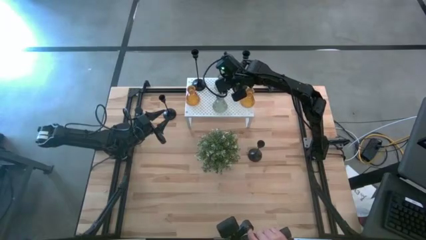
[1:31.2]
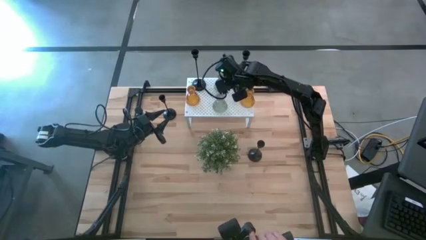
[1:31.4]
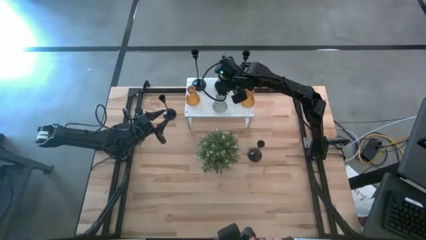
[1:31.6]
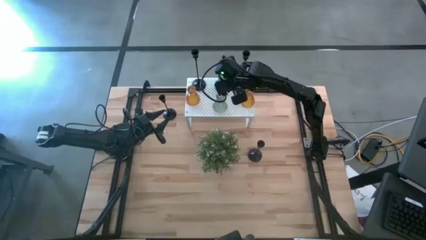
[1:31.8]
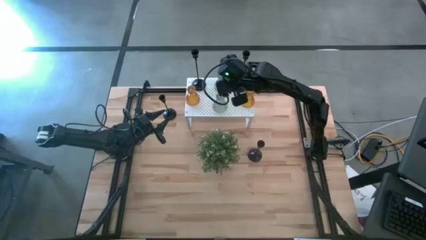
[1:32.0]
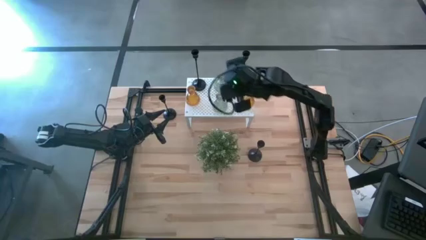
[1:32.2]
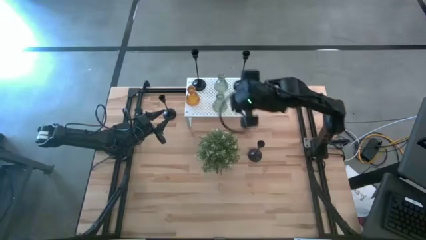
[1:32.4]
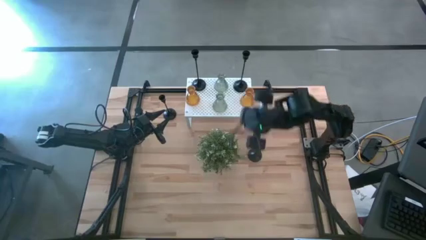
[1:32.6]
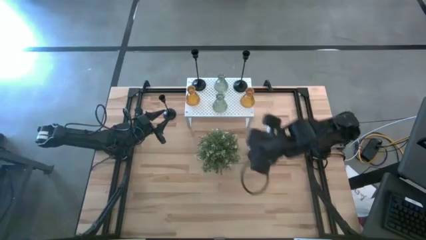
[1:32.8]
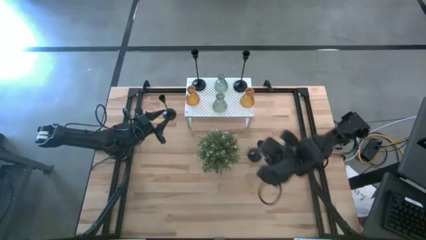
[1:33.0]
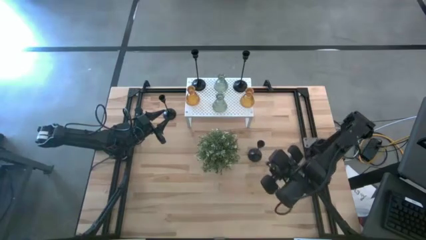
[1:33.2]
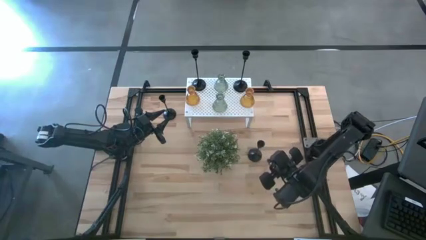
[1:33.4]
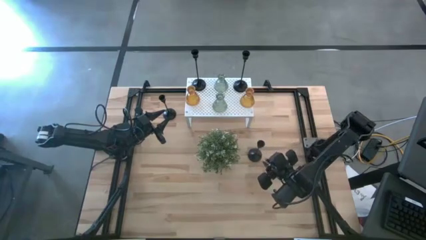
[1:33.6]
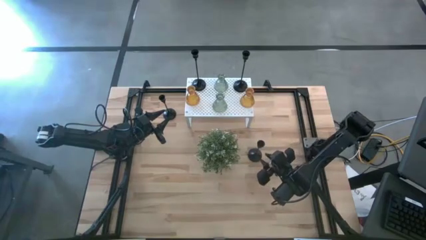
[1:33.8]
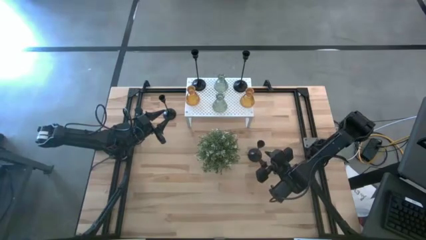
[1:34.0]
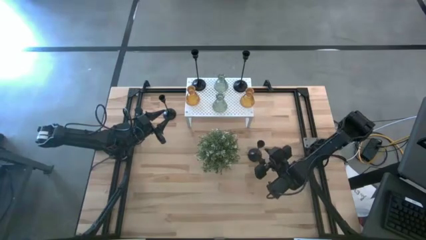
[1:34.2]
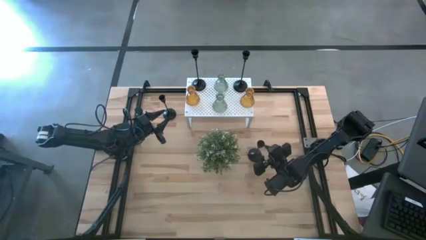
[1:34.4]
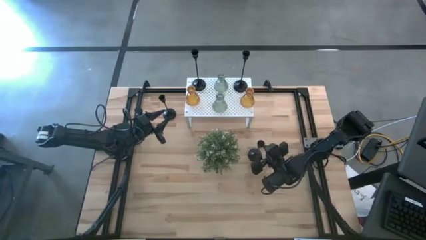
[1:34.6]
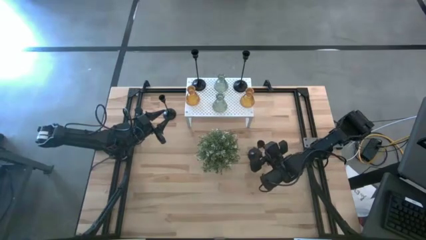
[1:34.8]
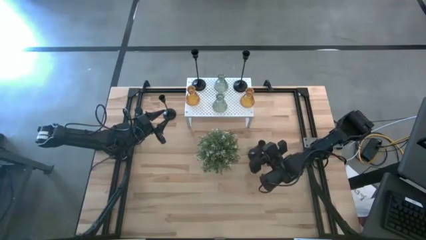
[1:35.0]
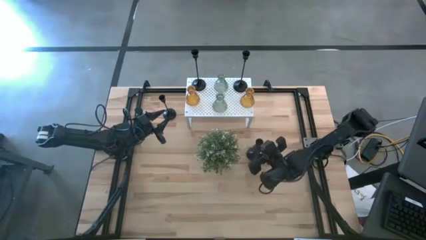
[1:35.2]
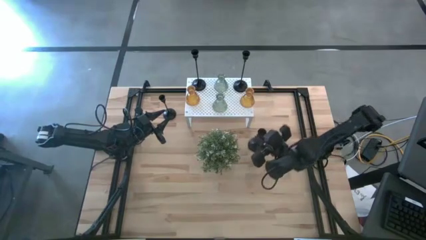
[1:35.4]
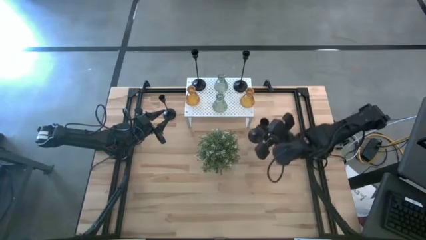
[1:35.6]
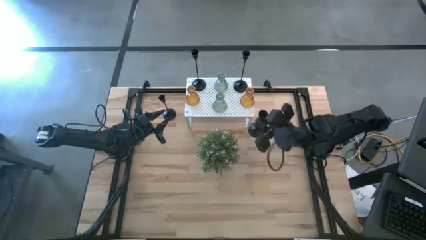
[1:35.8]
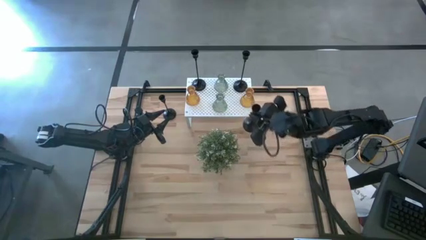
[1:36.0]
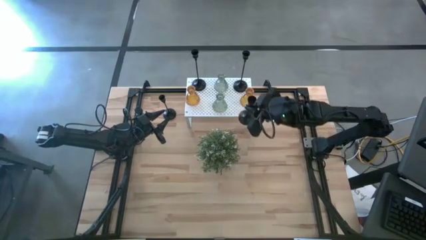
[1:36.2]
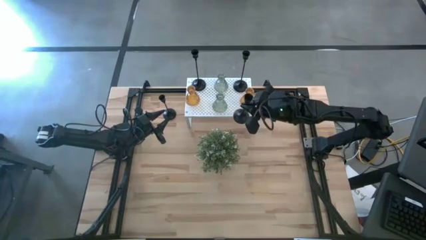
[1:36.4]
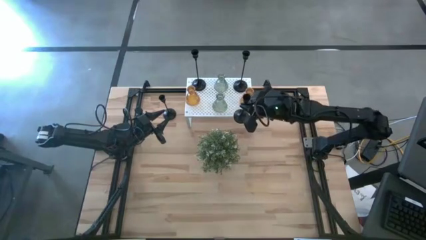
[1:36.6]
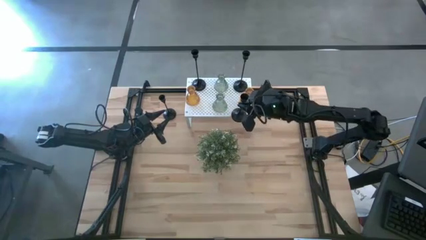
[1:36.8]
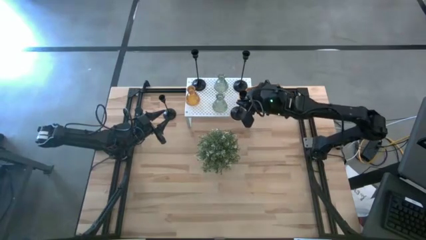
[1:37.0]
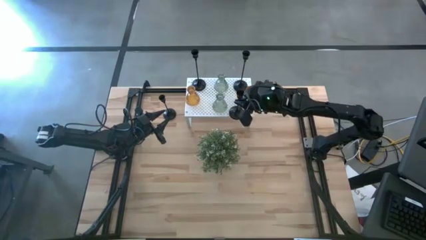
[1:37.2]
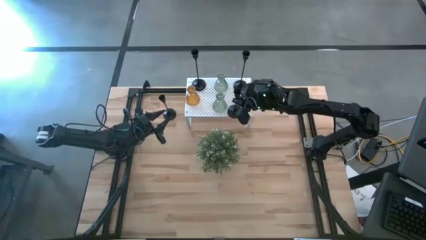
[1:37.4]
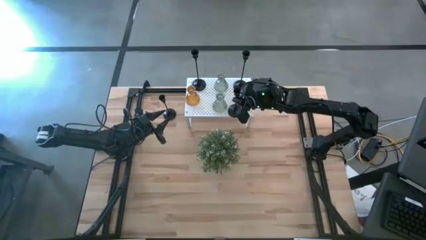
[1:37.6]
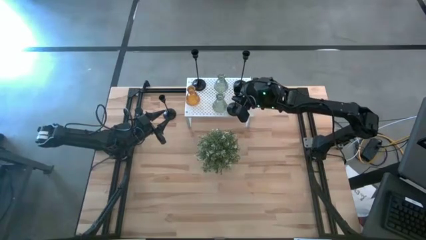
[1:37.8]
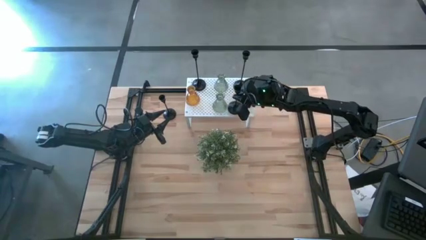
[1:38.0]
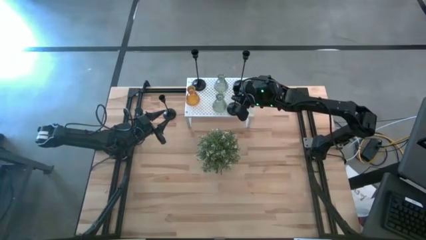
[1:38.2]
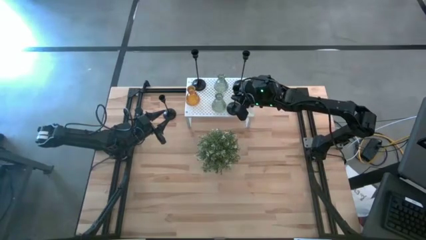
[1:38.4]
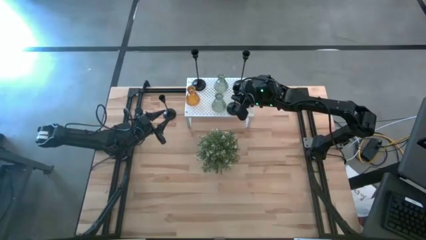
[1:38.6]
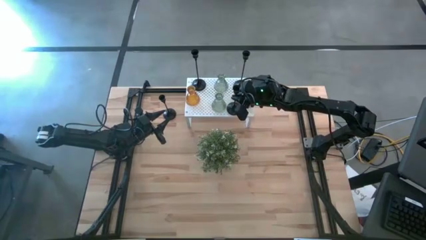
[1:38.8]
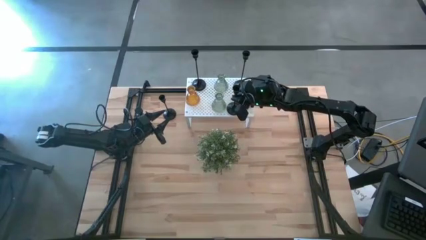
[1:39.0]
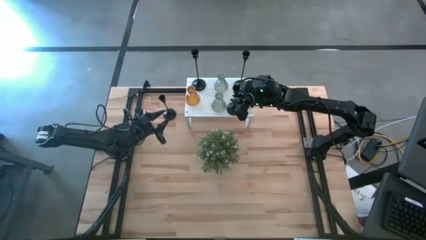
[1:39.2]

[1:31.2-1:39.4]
Task: Pick & Place candle stick holders
Put the bottom right black candle holder on the shelf

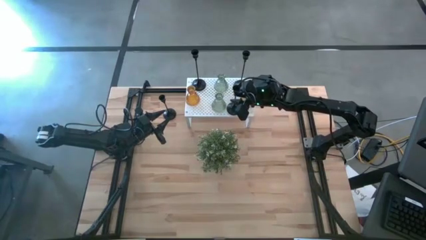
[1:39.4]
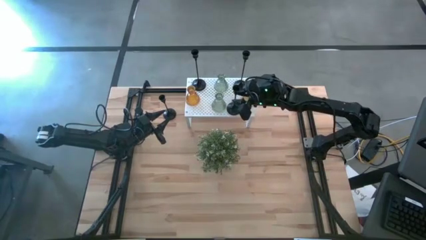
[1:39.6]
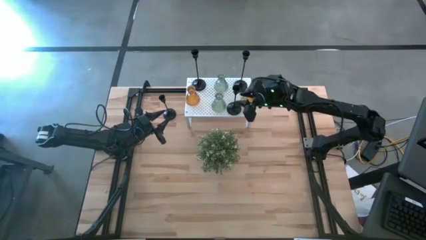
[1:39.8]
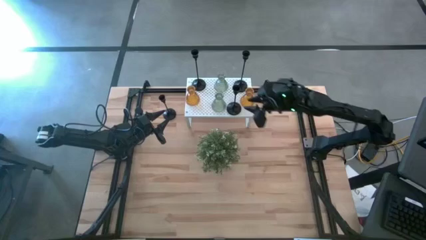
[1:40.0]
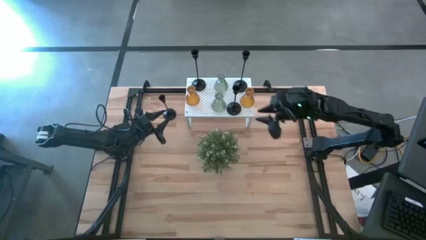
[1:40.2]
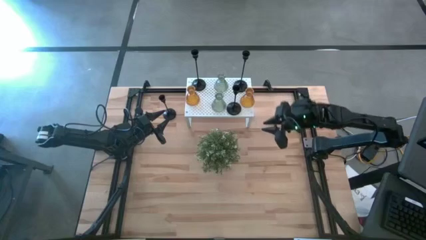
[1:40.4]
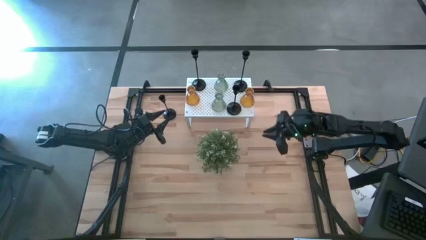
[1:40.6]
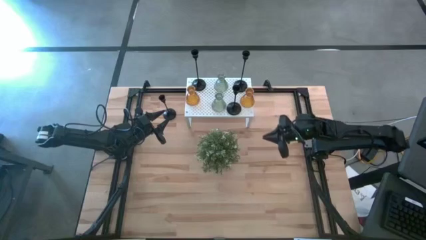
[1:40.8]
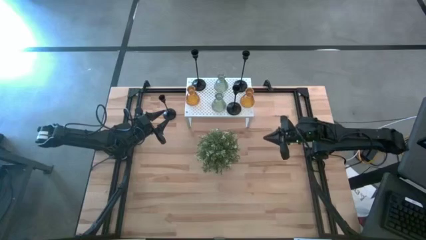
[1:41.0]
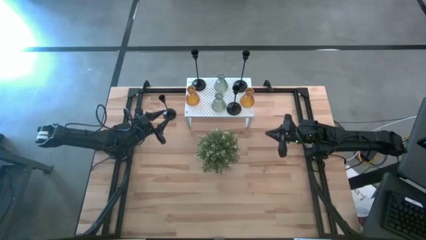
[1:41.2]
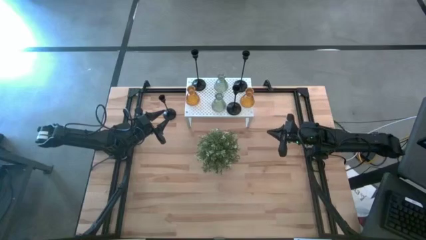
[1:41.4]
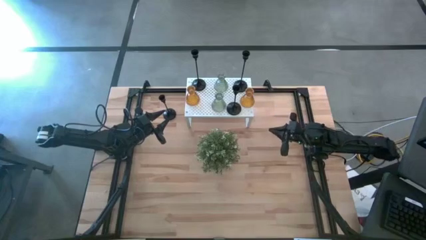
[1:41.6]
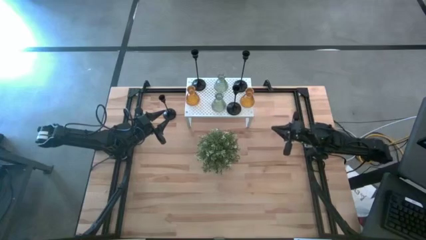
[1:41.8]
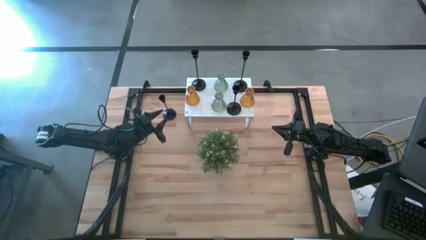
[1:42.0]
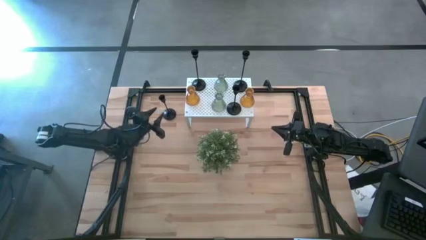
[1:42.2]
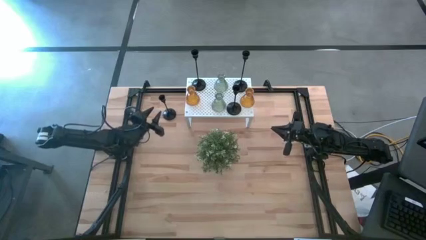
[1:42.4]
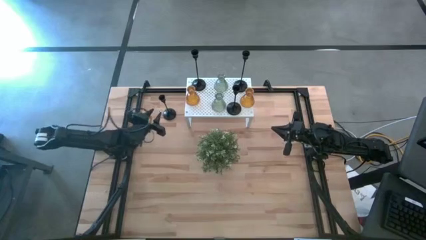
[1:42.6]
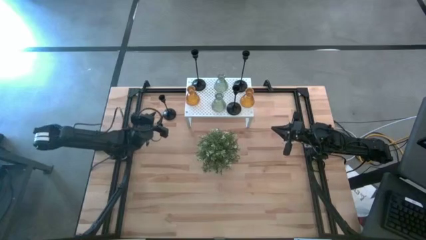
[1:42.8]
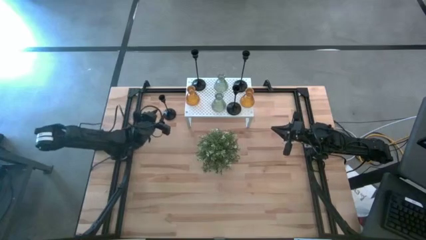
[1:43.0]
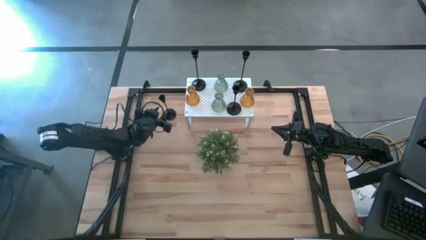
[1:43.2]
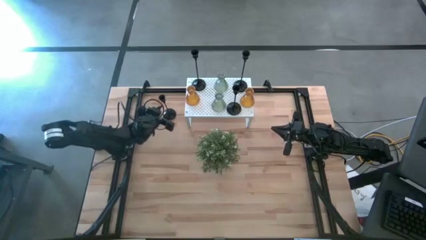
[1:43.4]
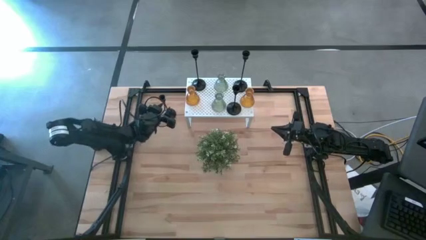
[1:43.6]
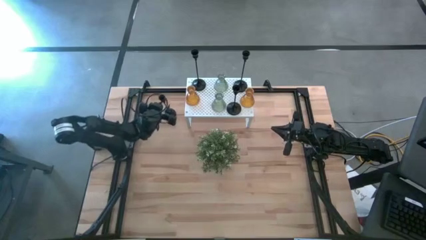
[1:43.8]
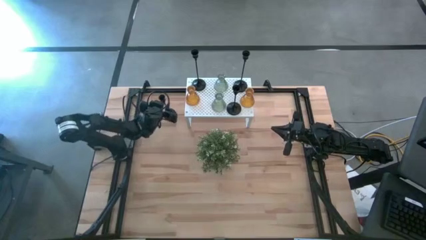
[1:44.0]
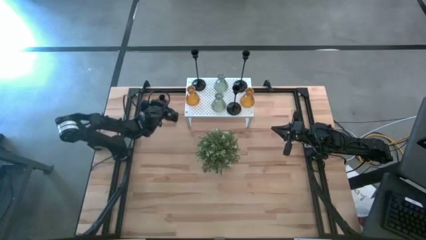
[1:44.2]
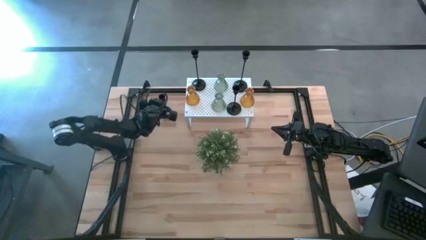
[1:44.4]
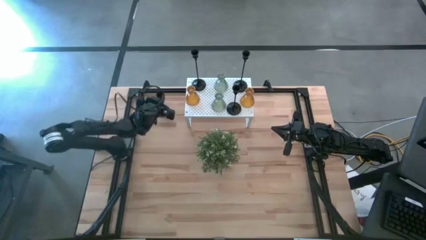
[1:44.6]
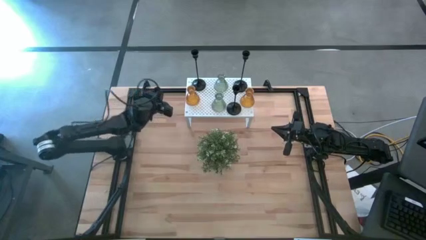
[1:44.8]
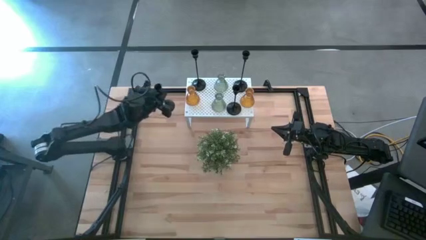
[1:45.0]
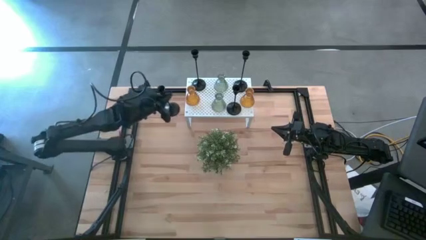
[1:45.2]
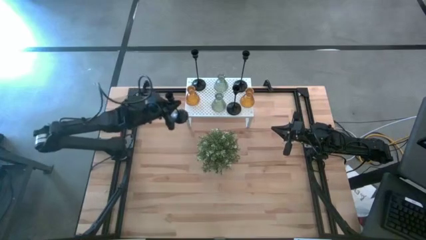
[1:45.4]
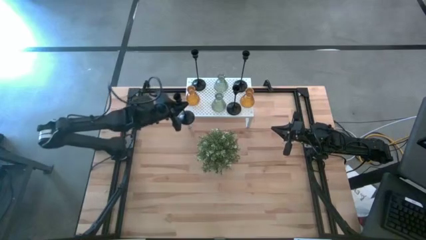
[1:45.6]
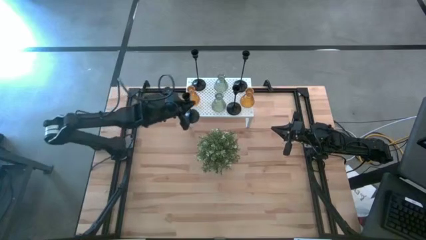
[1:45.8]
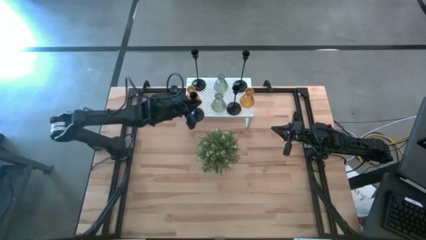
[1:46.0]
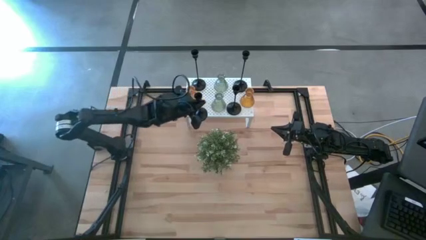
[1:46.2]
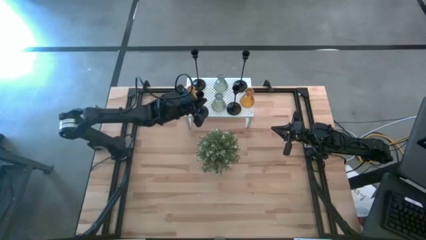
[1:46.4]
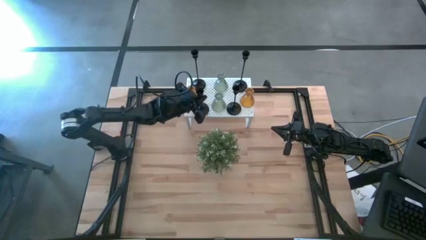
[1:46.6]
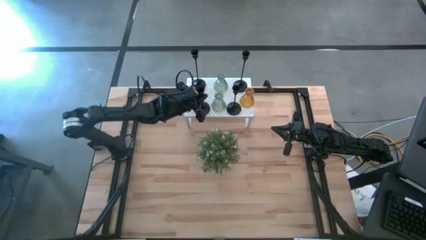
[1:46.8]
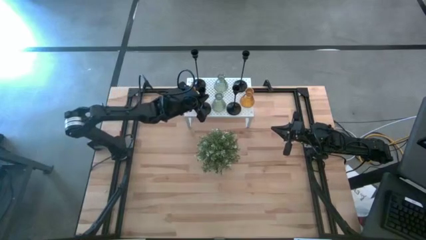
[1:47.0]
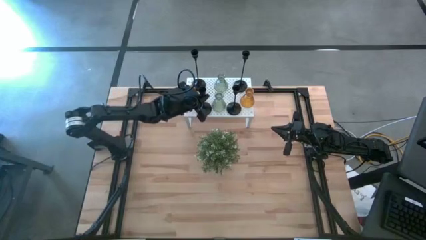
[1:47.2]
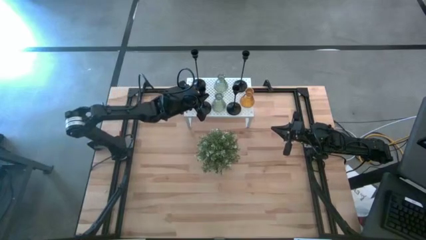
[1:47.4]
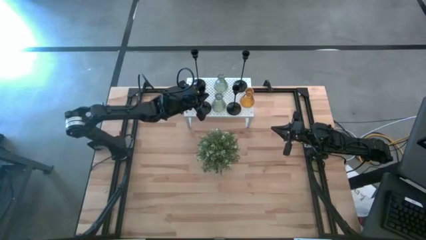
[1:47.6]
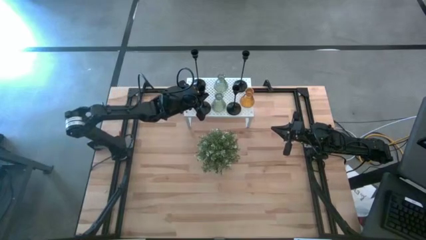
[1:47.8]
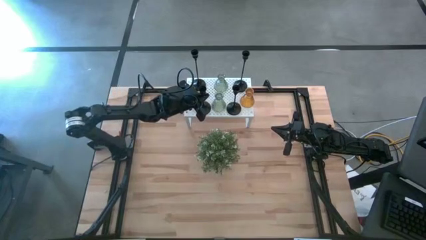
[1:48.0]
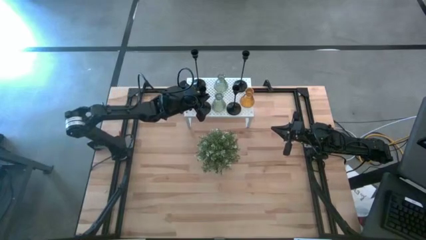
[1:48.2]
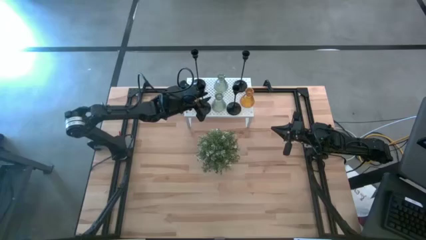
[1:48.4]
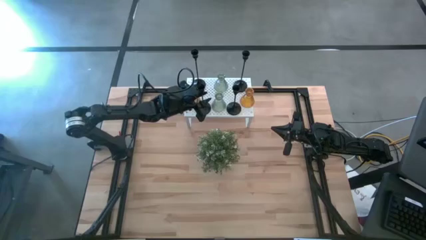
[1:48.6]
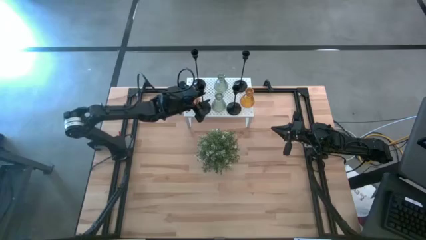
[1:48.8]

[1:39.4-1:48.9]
Put the black candle holder on the shelf
